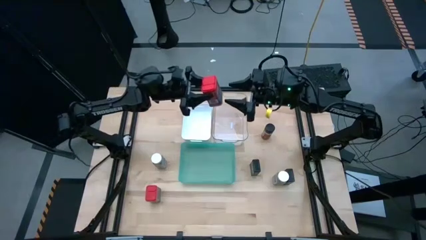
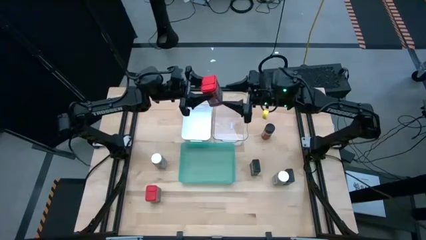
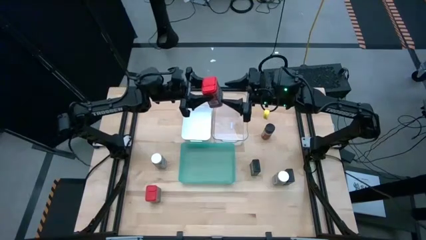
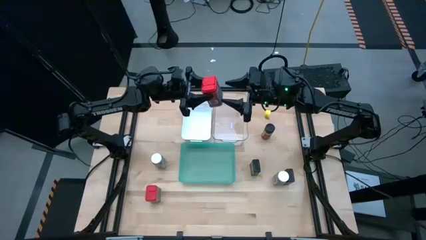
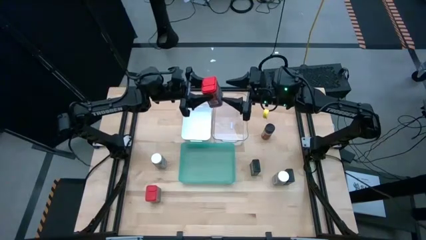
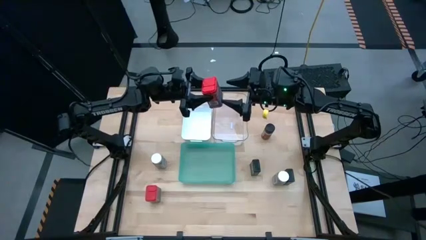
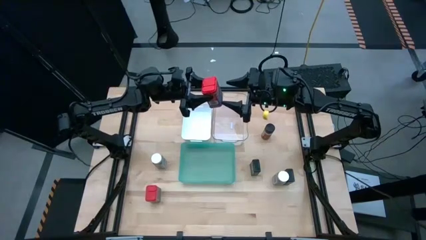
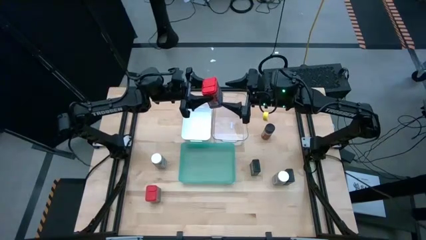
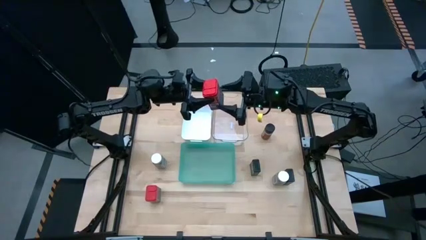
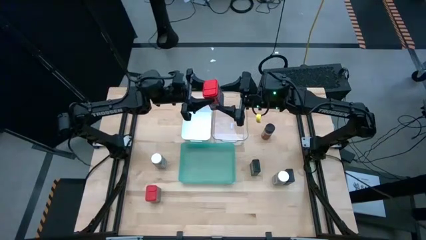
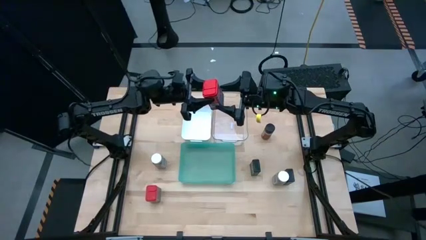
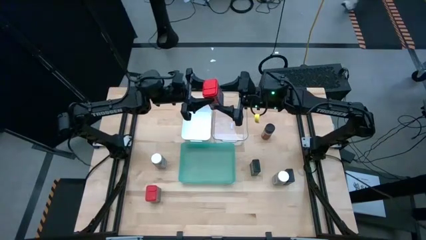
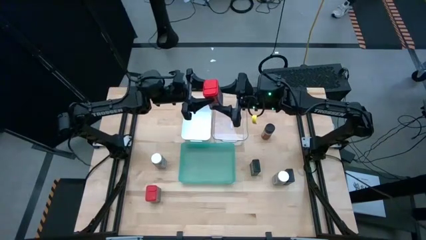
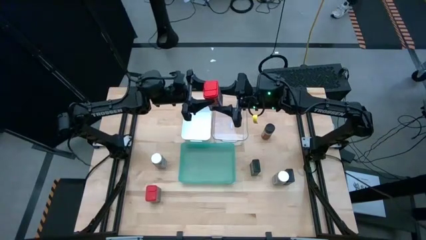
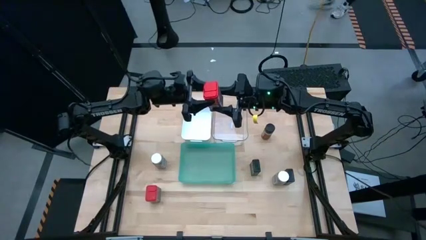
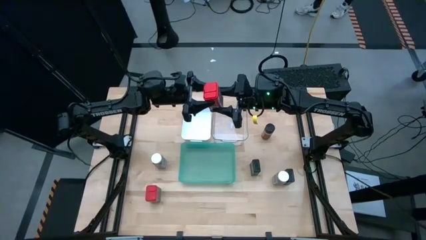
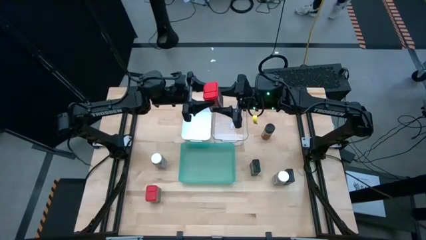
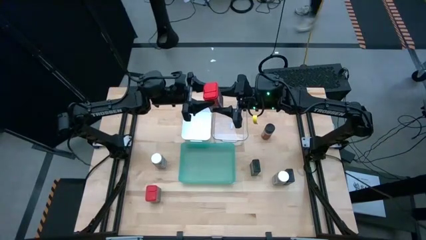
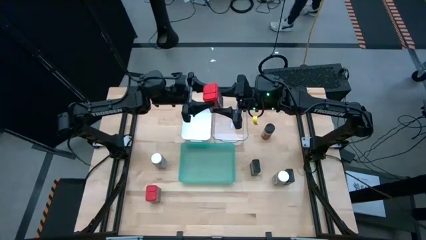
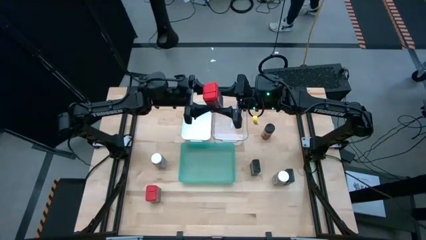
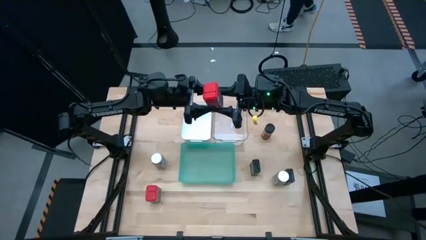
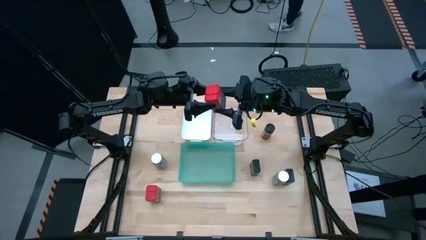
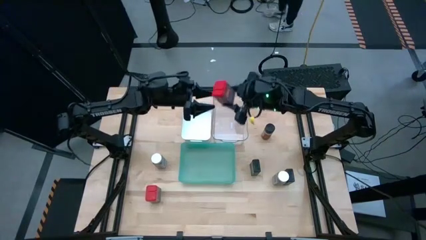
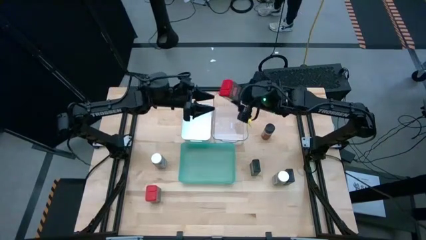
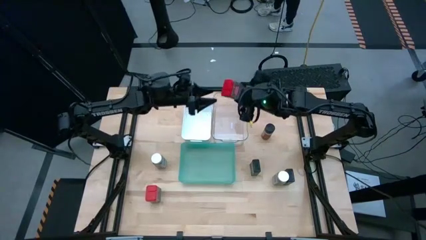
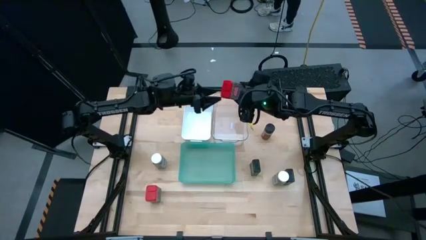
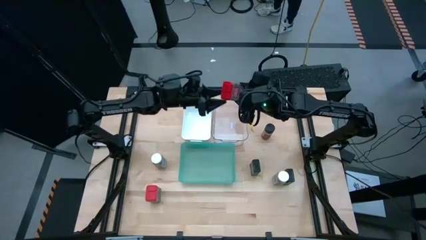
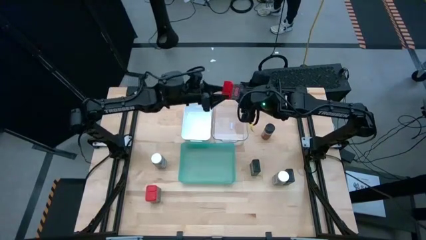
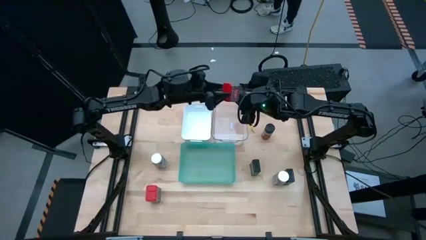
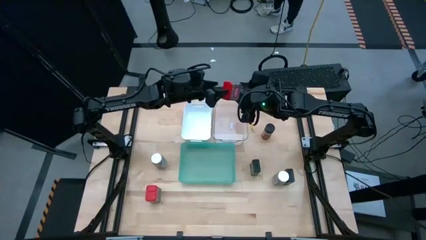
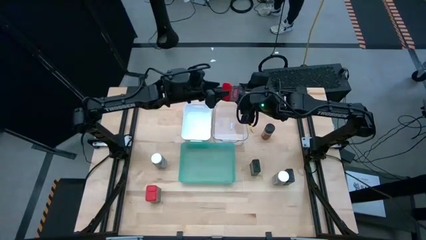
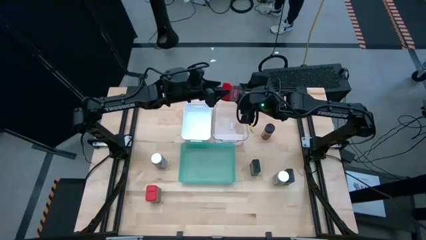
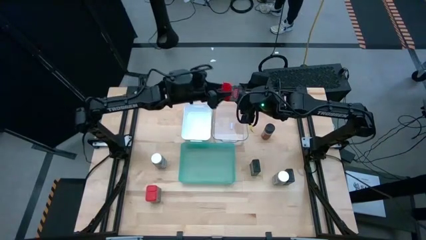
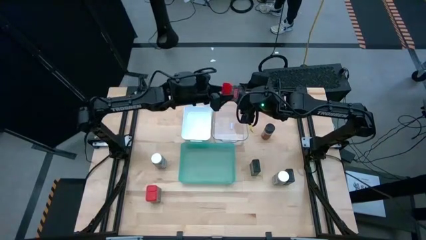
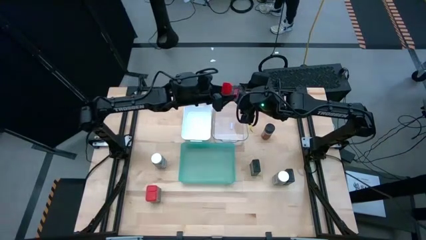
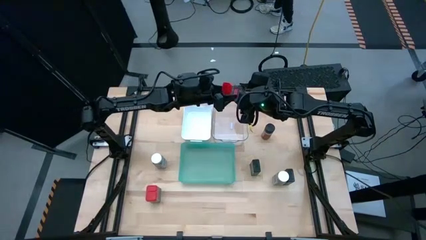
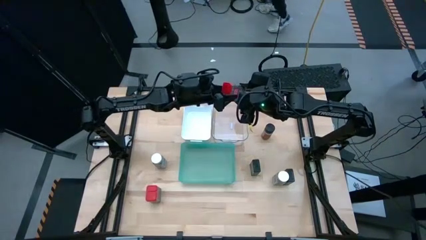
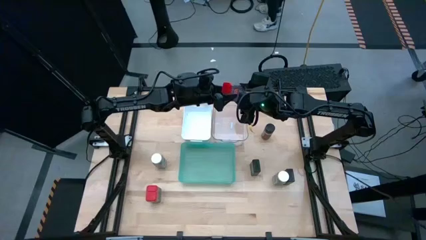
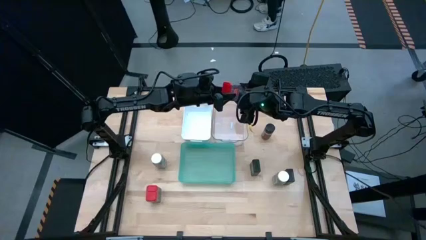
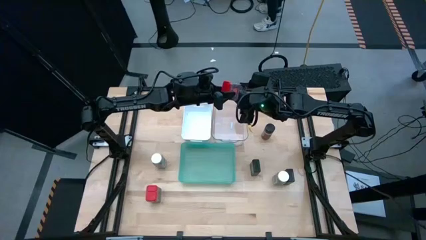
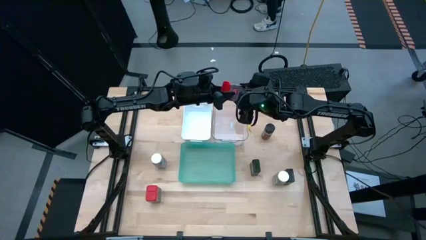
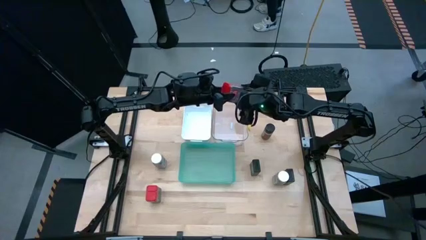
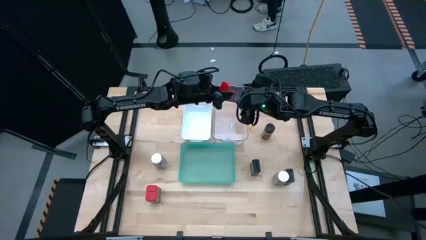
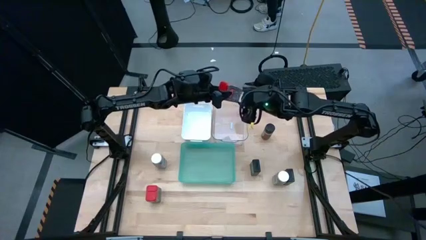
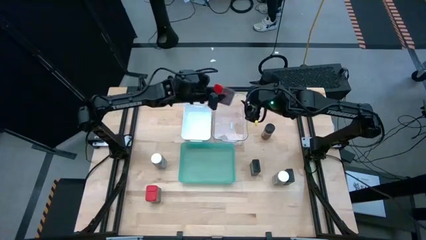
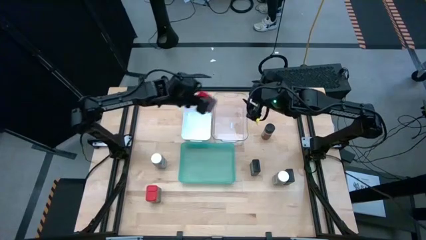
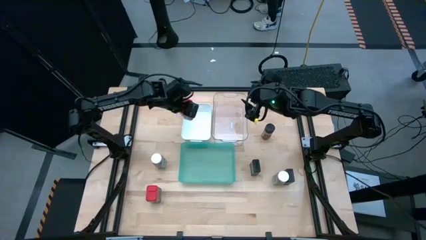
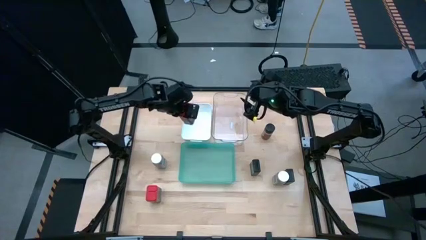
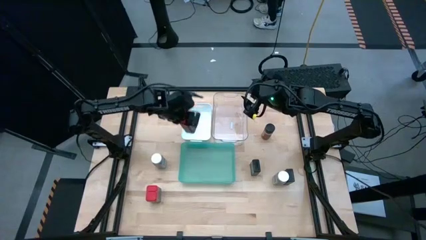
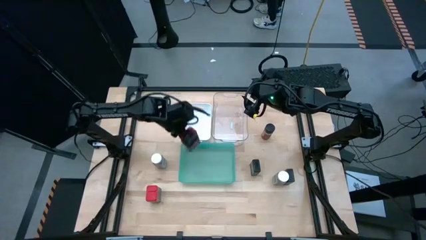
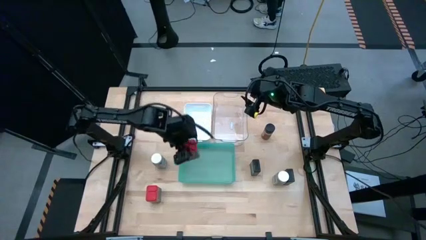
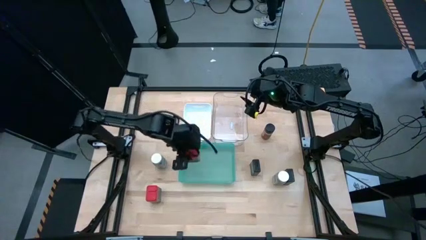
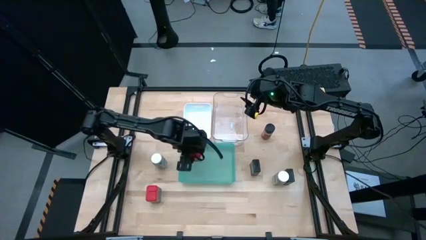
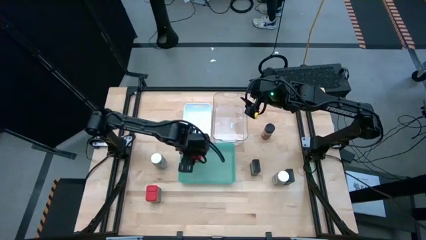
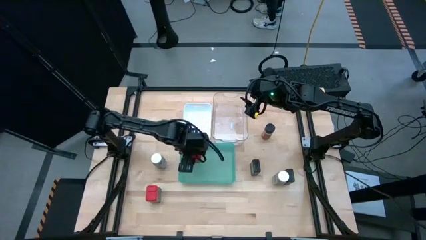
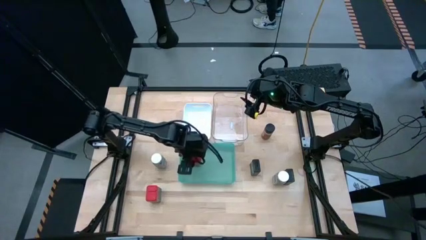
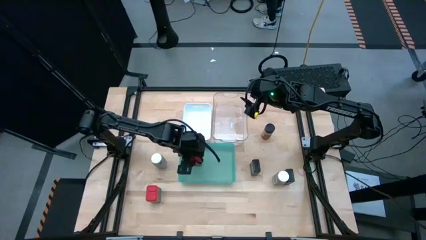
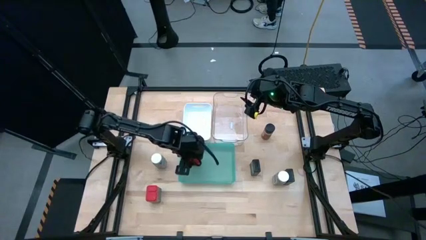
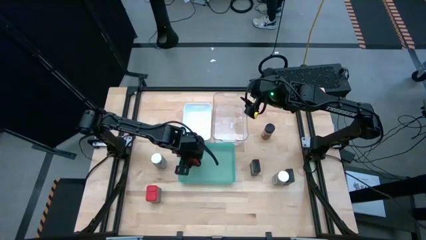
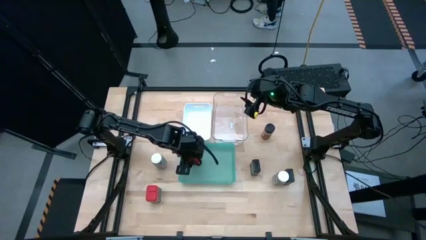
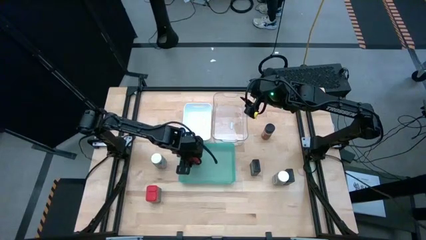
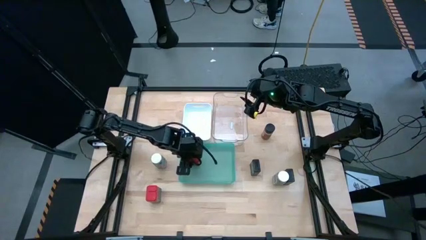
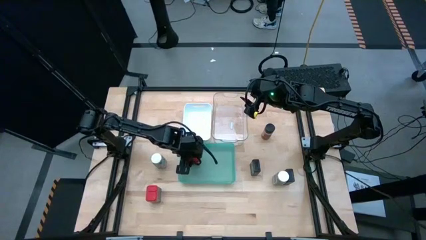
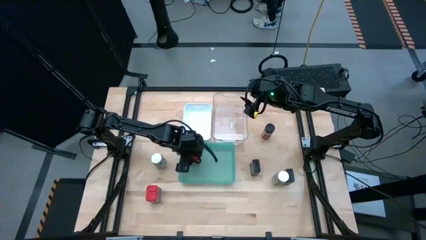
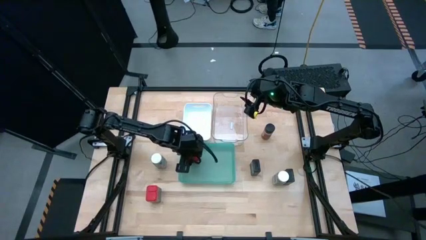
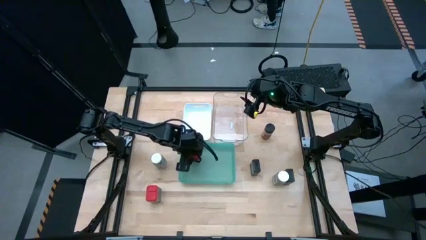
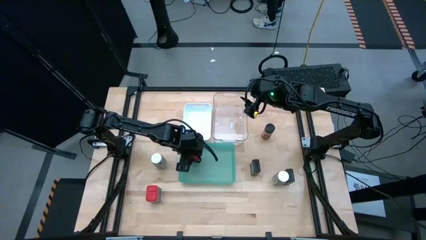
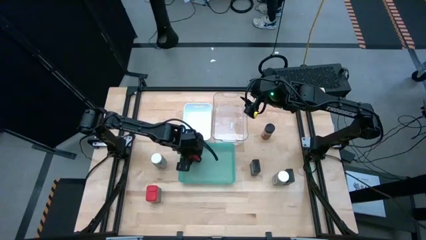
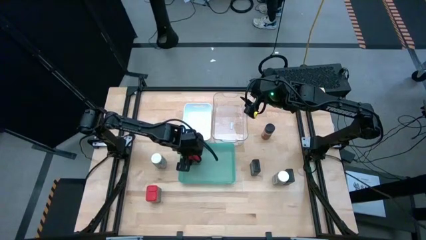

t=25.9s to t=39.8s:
Task: Sort spices by type
Put the top red spice can into the green bin

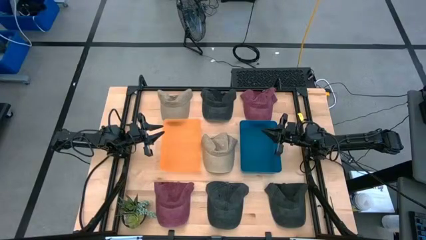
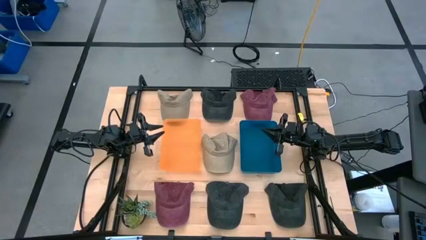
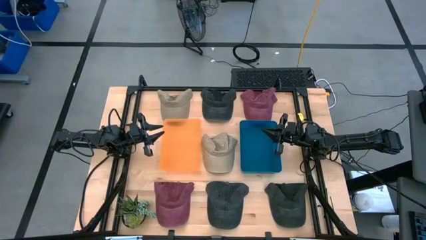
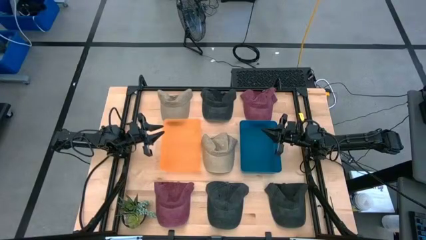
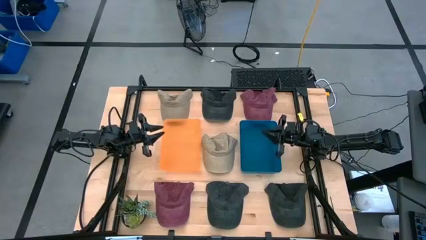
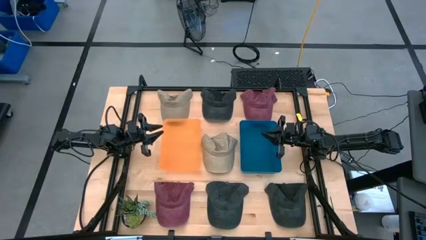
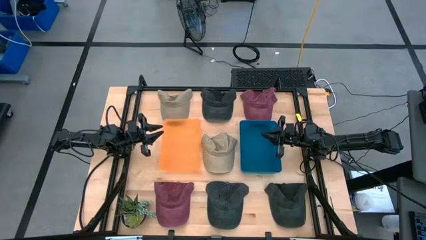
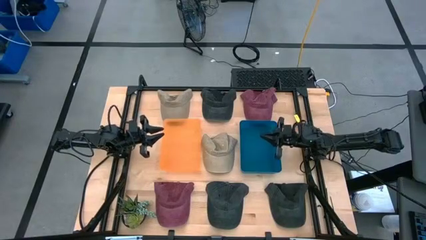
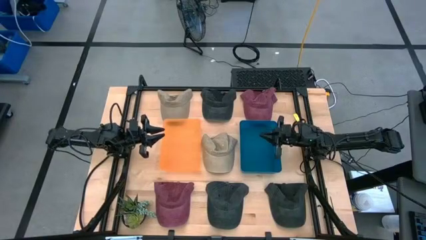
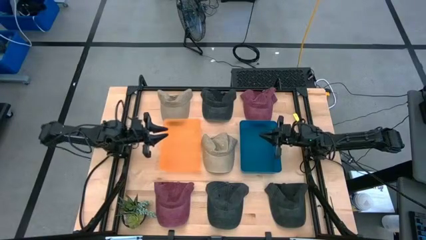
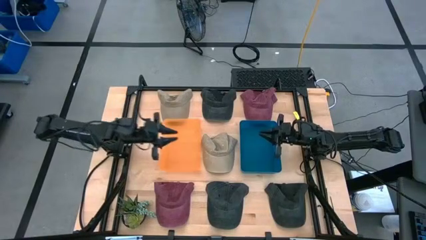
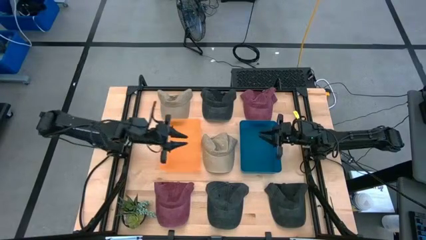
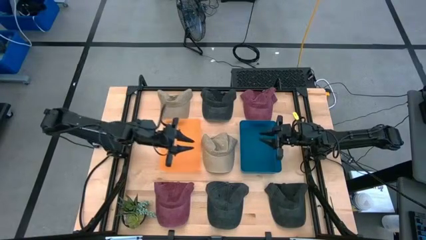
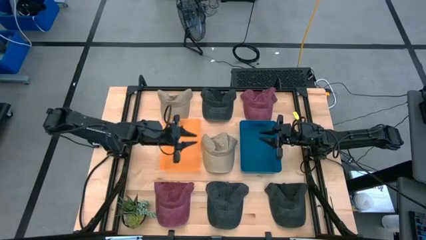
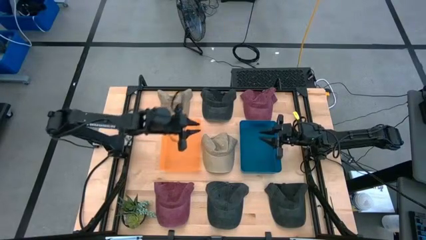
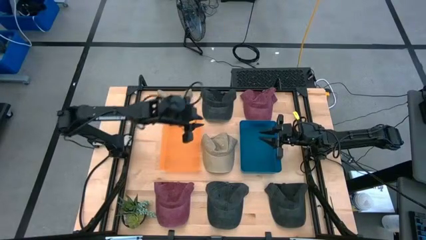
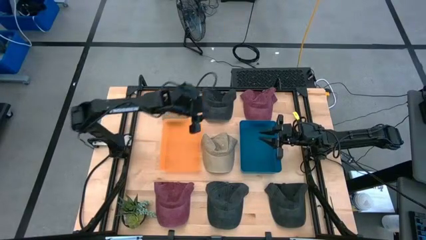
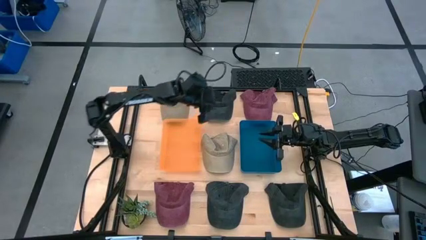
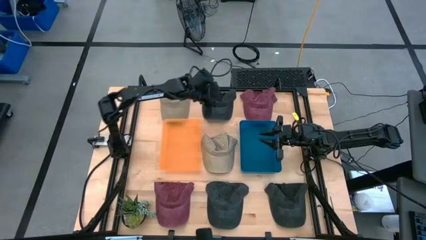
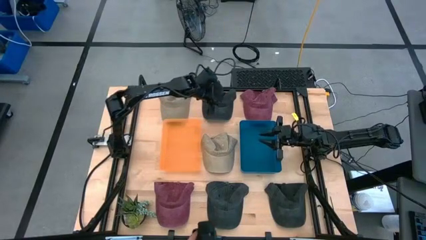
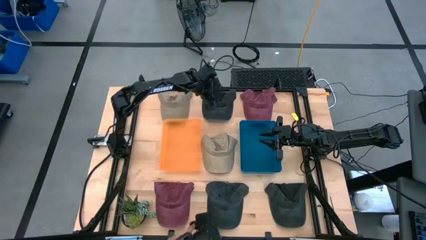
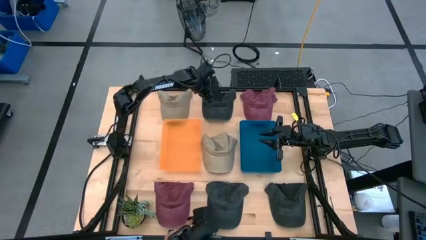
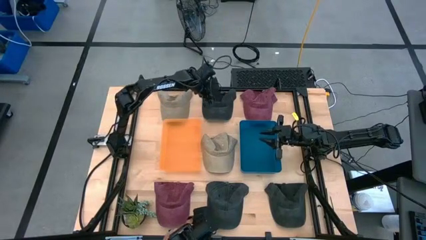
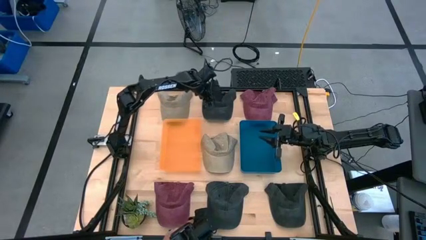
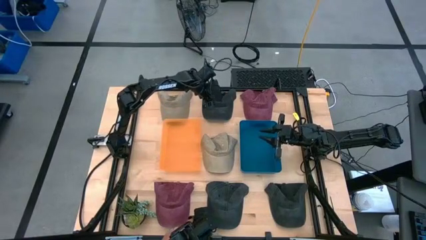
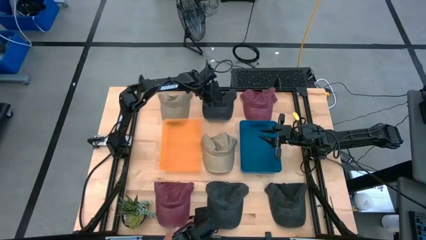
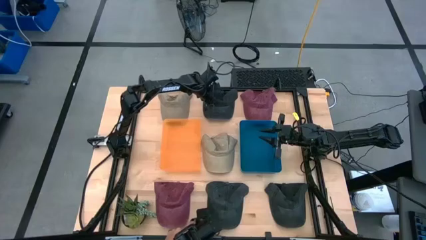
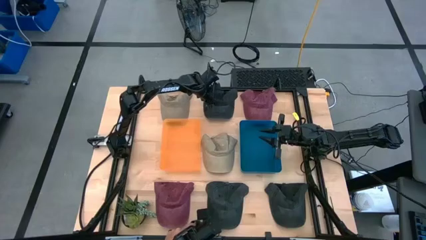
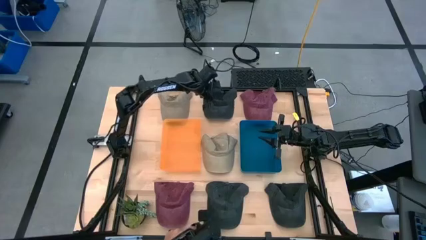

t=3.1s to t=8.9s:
Task: Pick & Place hat
Put the top black cap into the orange bin
